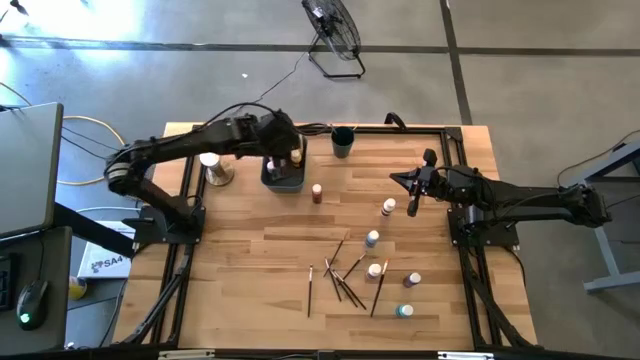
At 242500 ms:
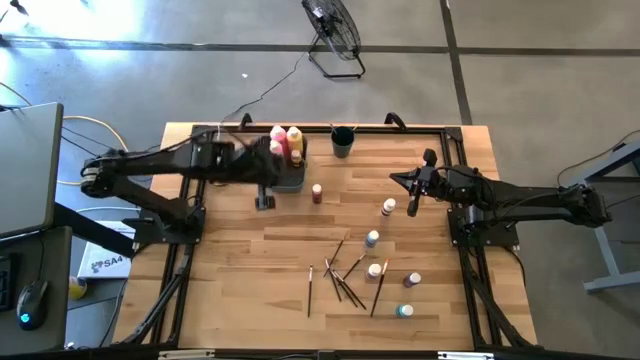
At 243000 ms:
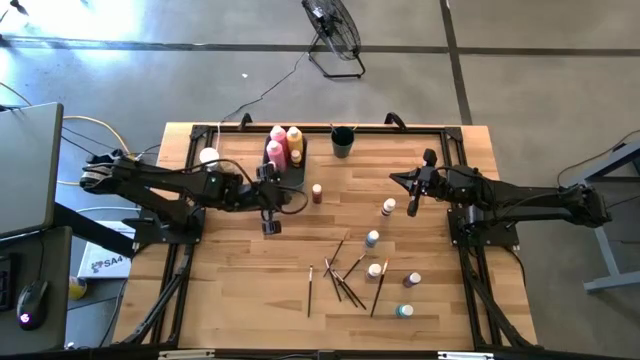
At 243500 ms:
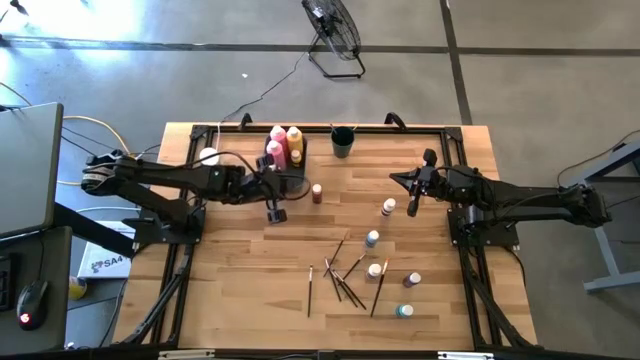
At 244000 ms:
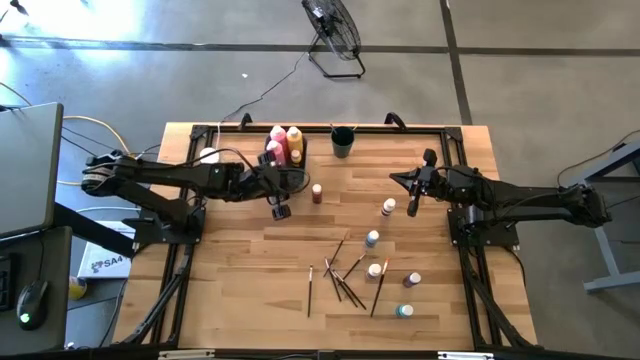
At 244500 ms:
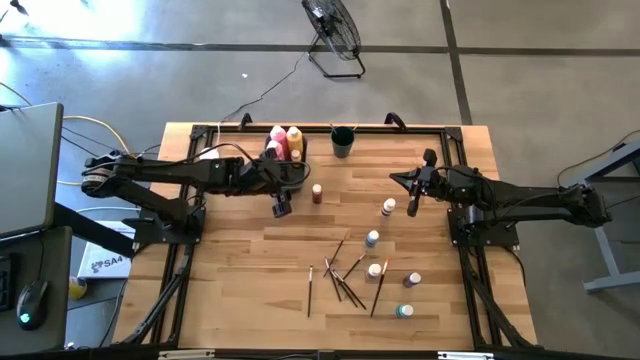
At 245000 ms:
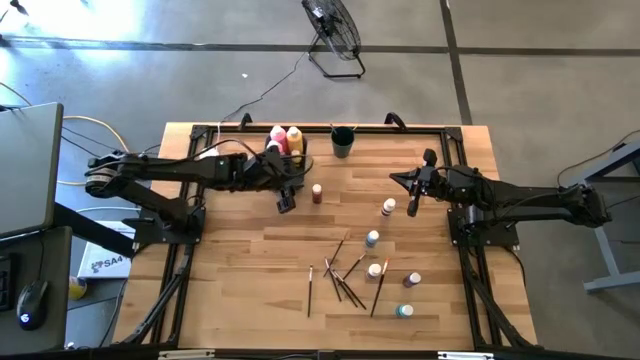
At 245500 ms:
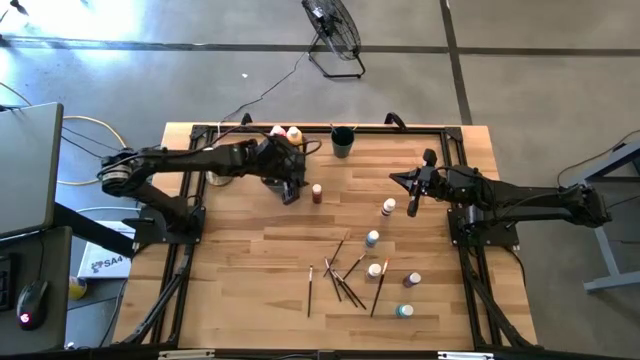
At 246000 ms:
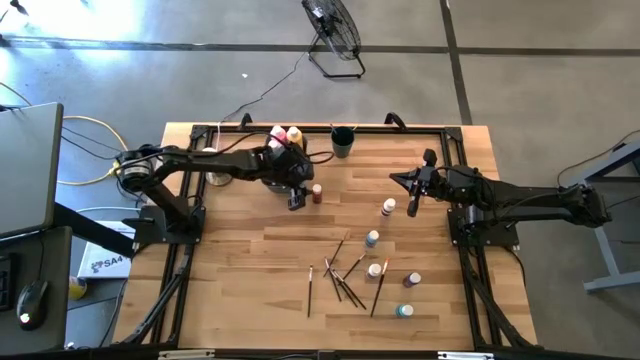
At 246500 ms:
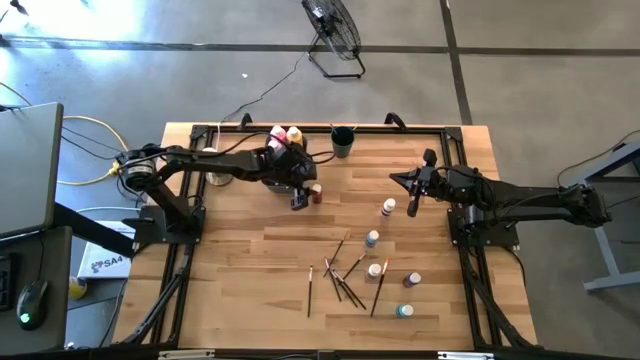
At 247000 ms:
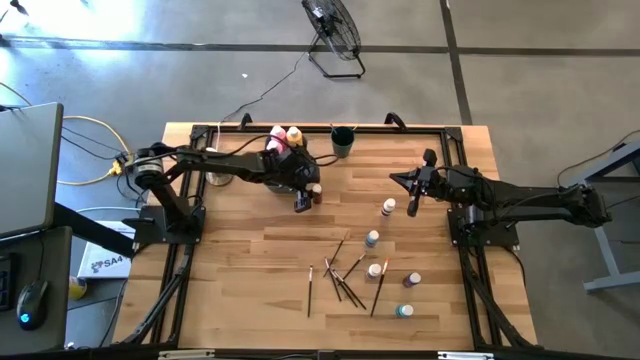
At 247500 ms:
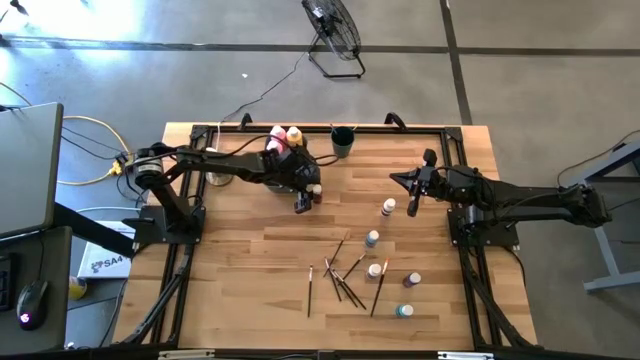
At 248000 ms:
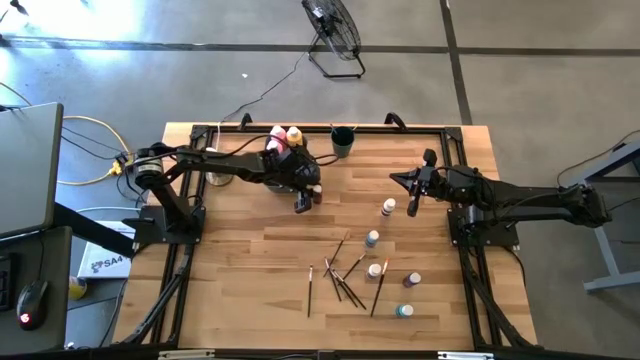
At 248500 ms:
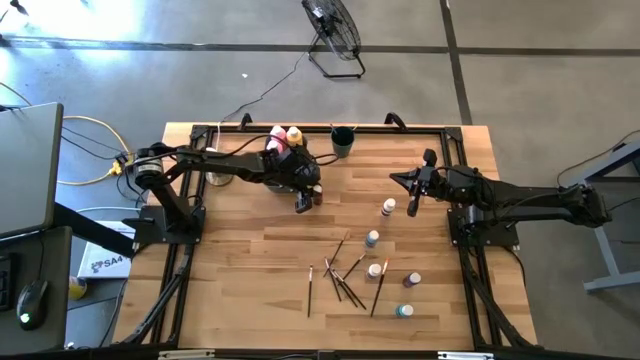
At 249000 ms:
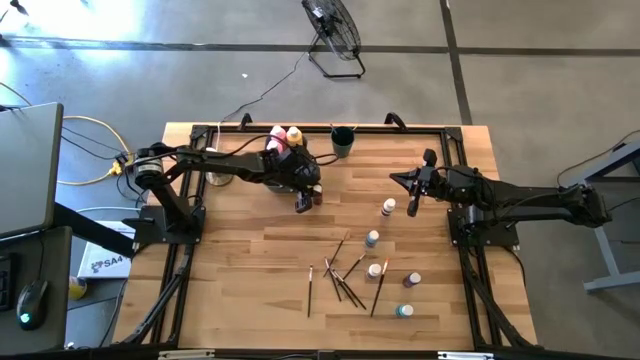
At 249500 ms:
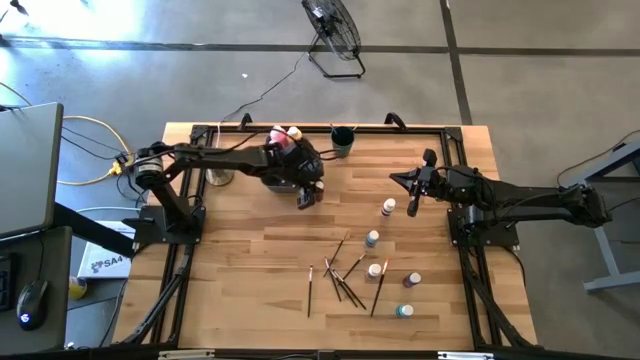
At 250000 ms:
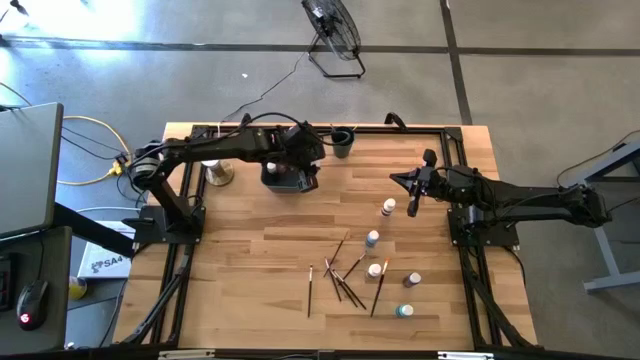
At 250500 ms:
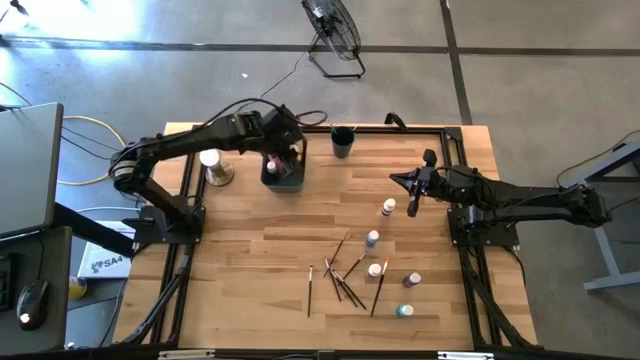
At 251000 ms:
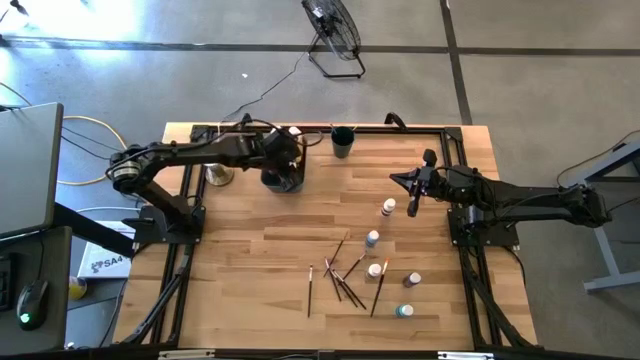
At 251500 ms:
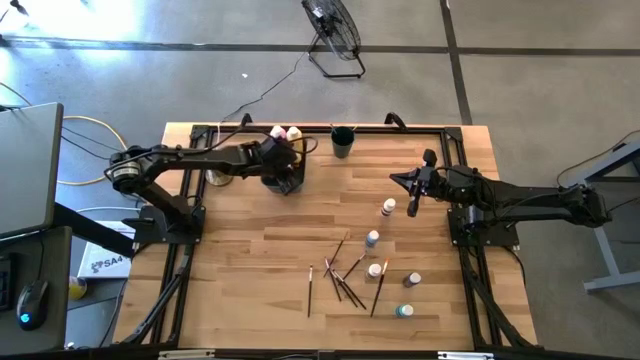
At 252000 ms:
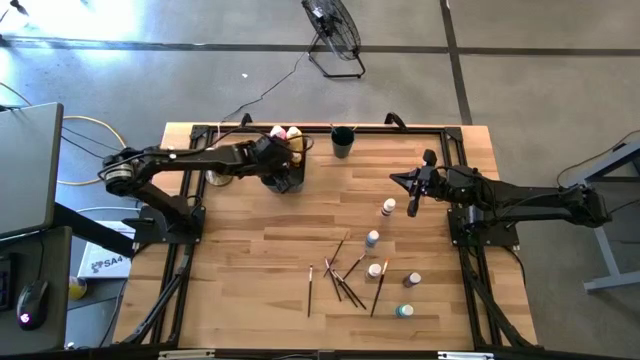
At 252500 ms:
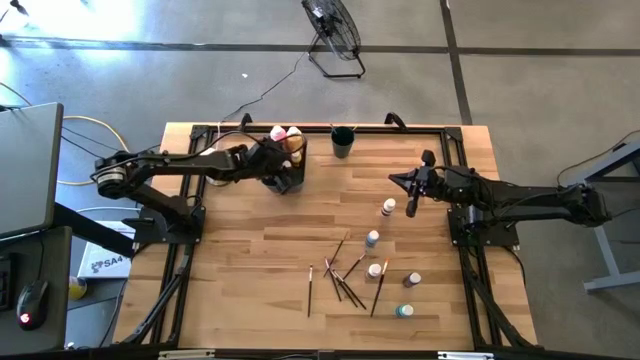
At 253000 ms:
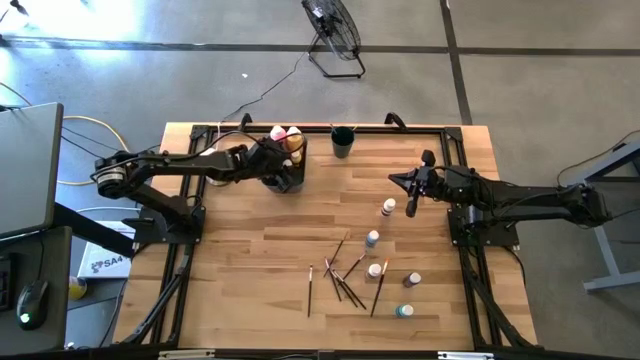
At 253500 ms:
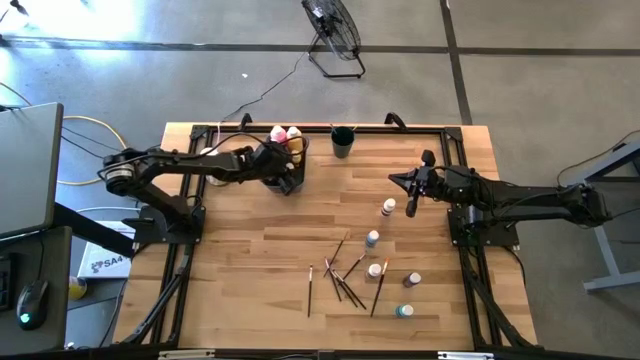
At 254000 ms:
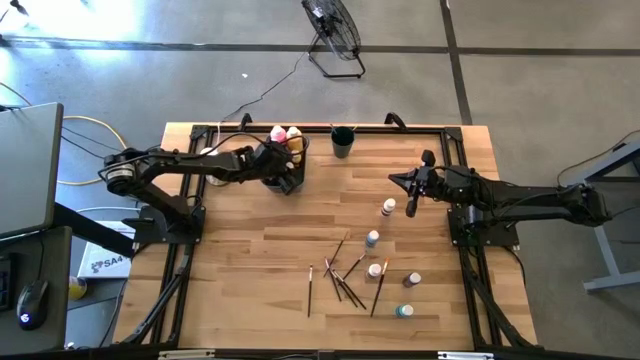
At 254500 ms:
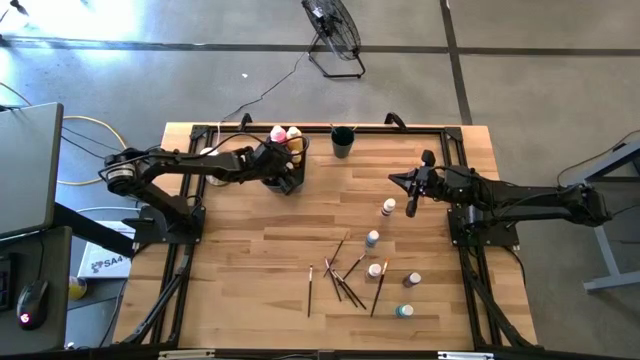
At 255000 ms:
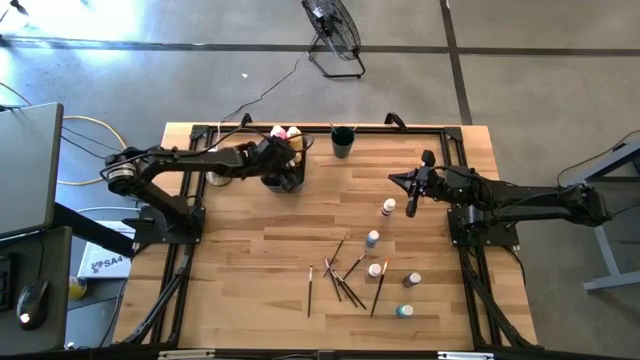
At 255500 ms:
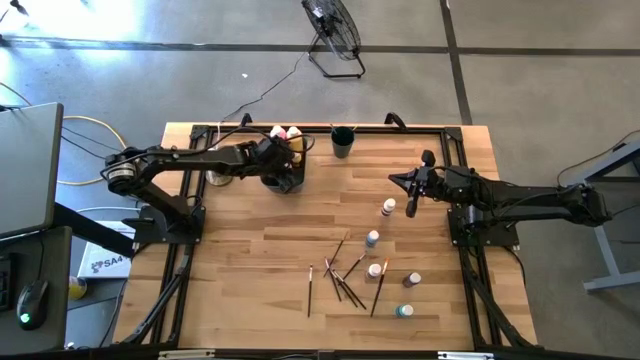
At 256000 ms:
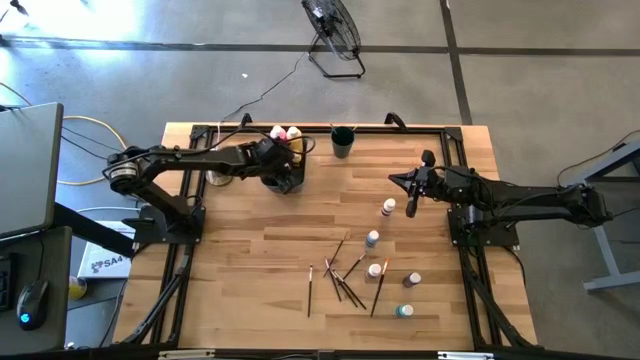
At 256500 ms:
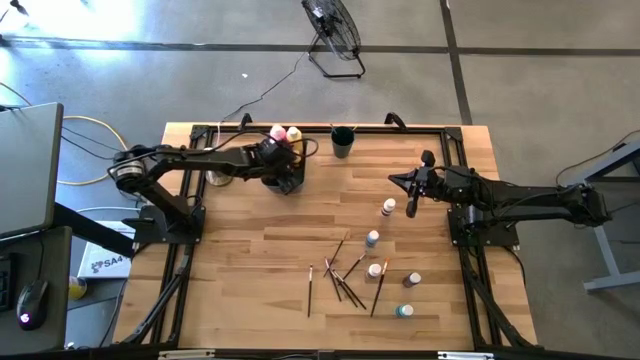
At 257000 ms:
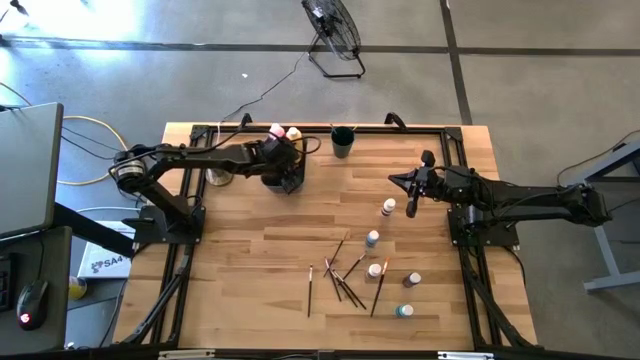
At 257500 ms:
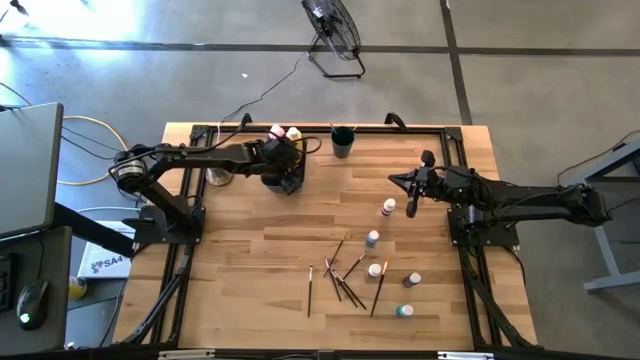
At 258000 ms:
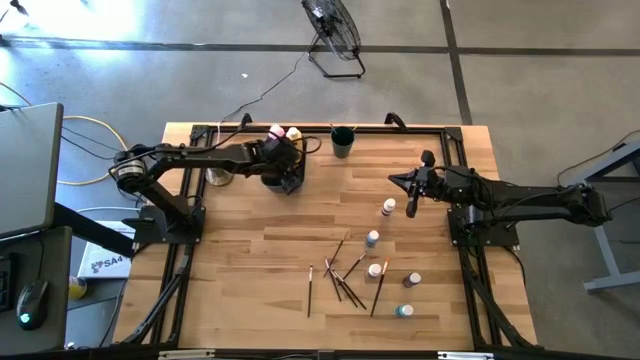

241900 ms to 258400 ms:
Task: Pick & Place Paint Supplies
Put the small red paint bottle into the green bin
